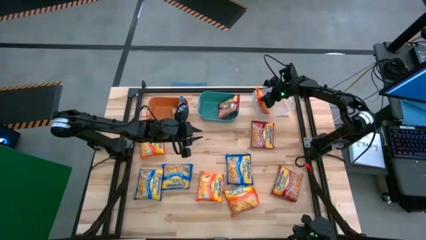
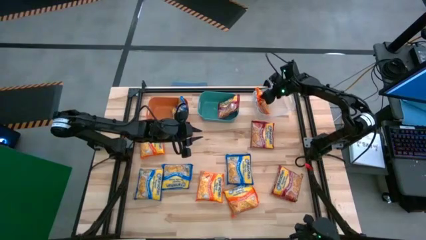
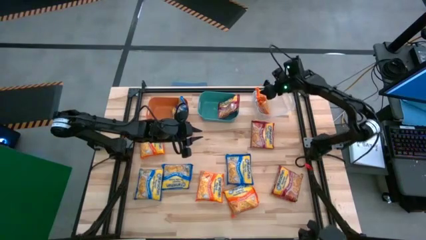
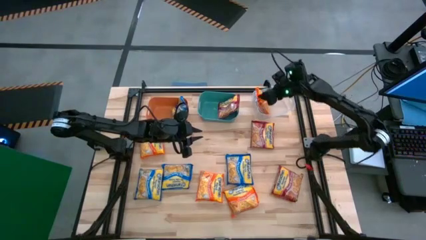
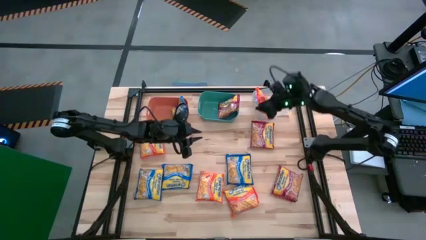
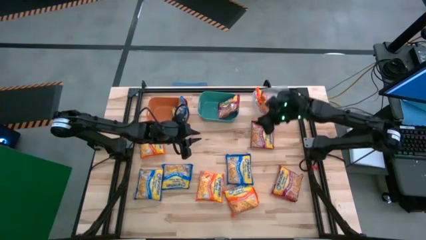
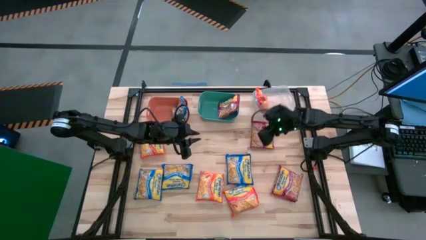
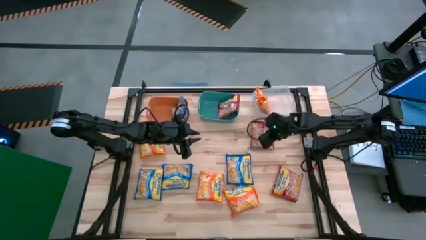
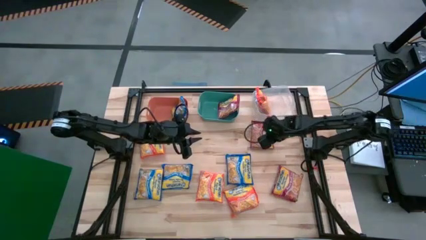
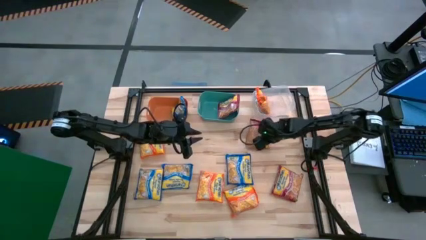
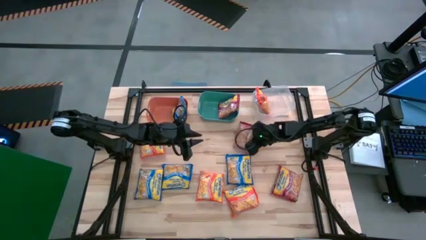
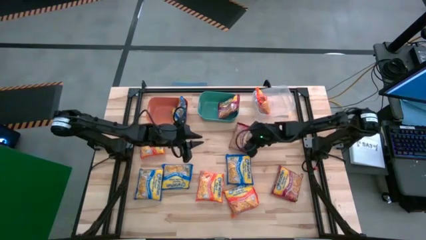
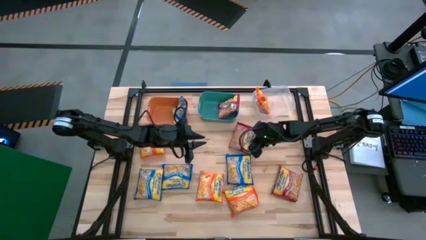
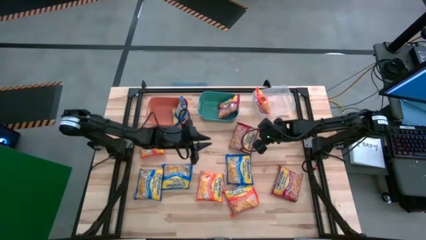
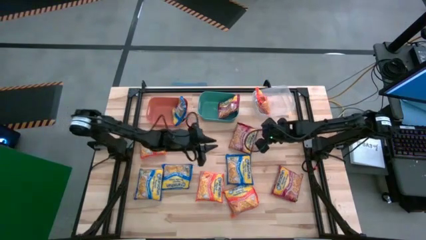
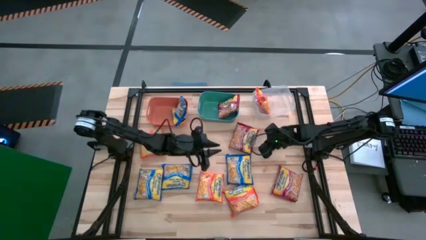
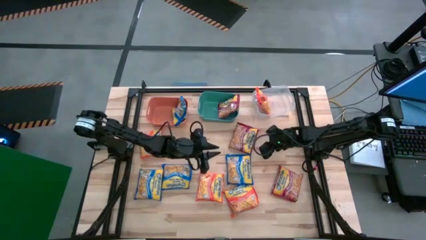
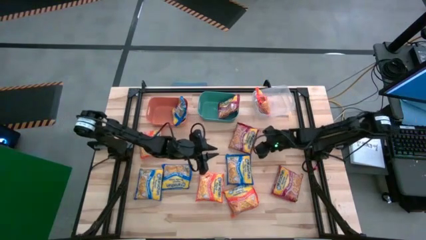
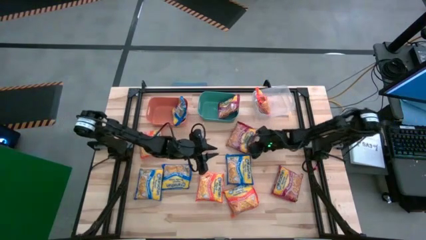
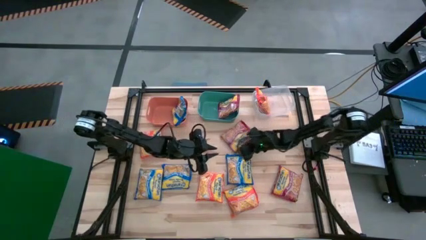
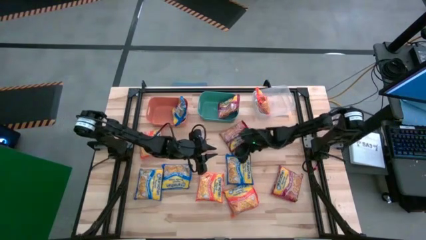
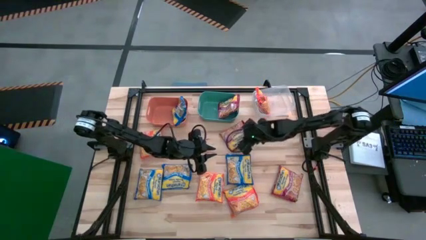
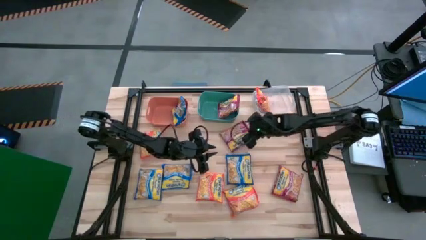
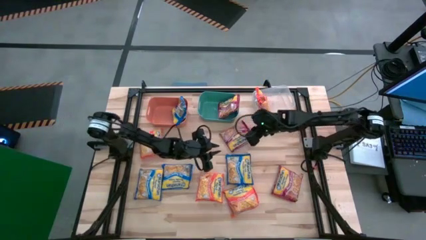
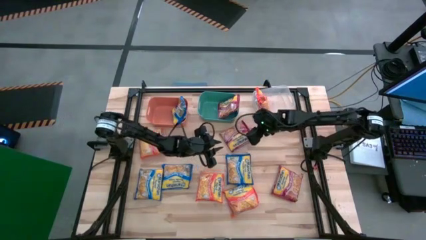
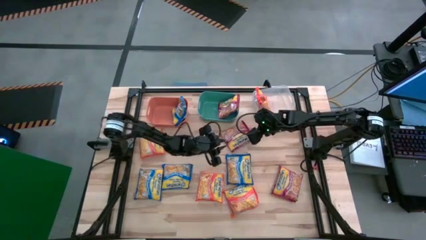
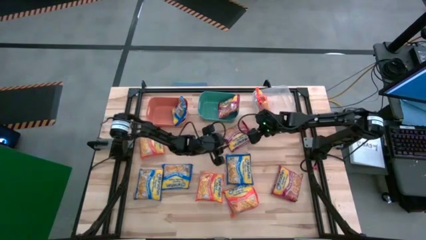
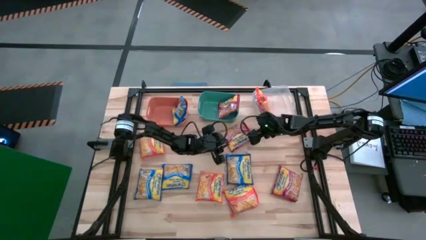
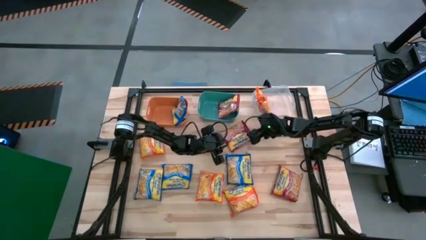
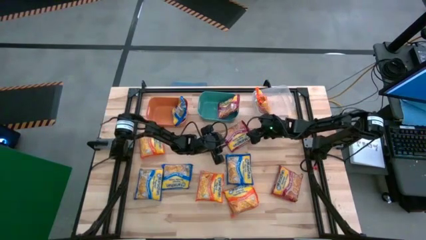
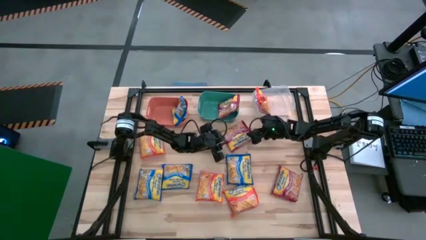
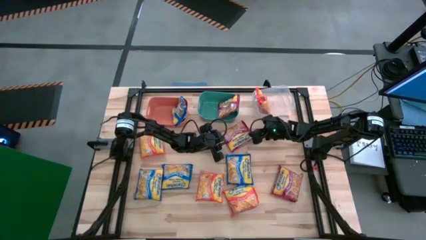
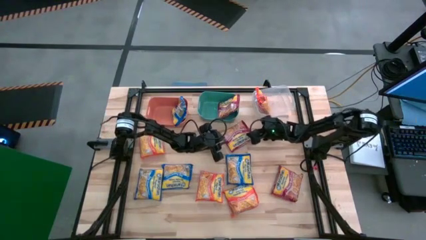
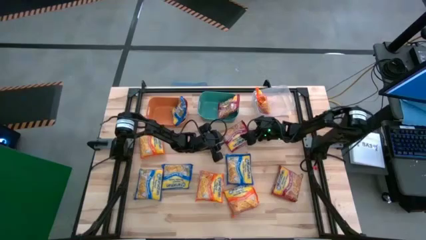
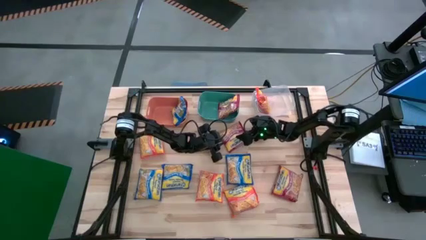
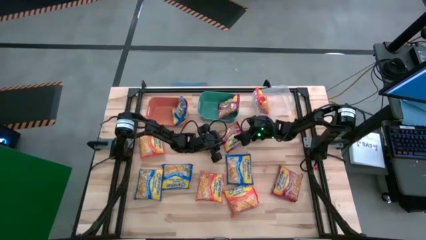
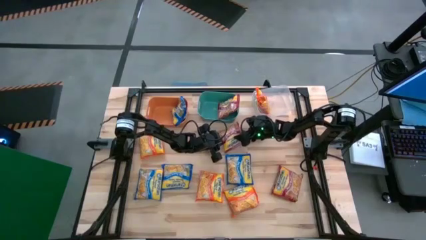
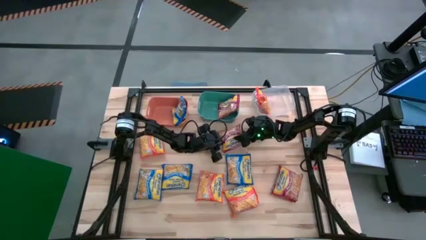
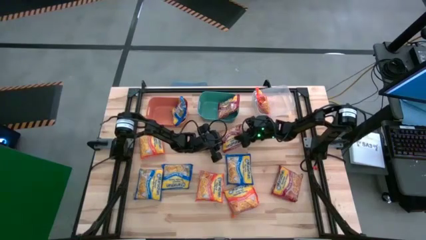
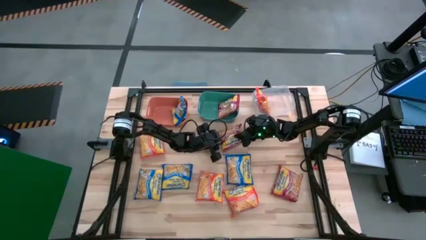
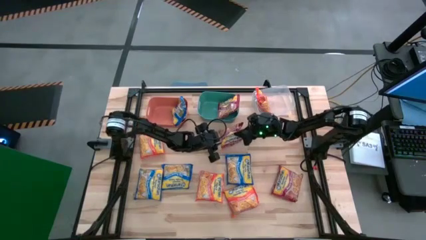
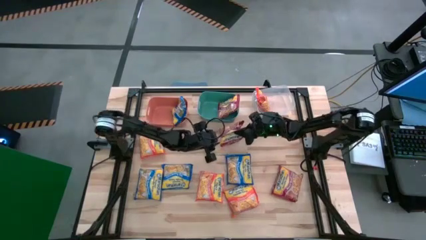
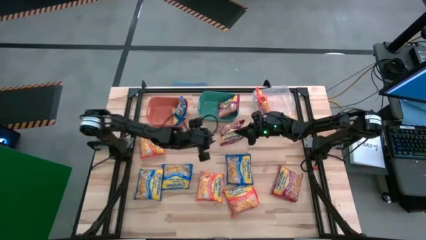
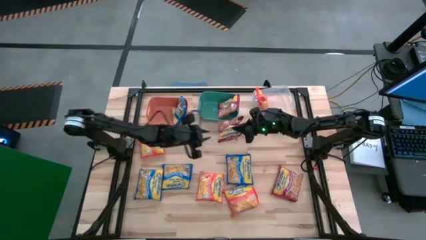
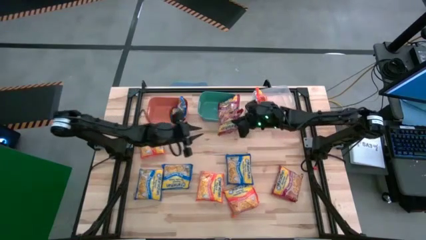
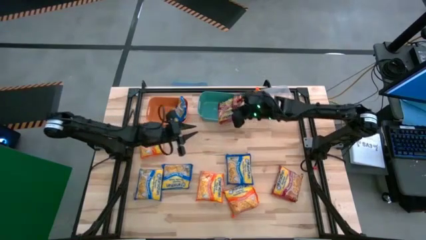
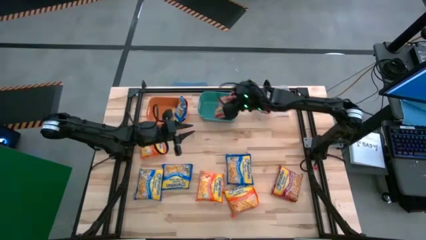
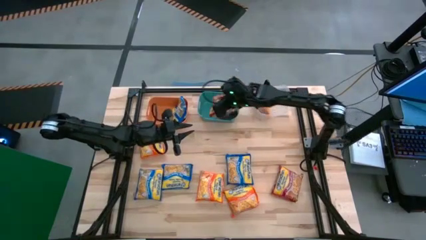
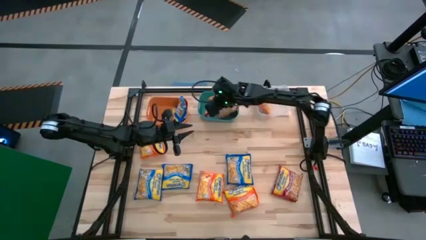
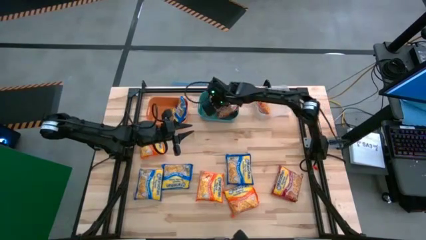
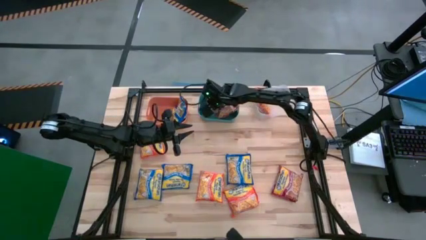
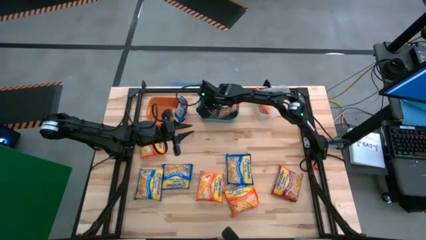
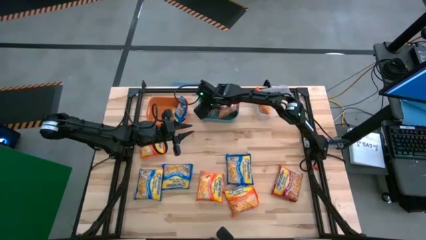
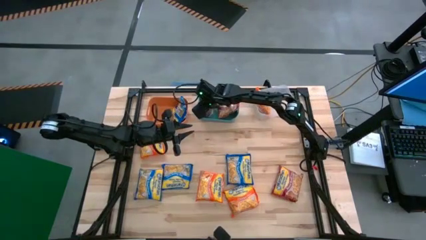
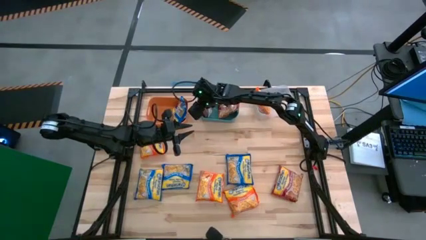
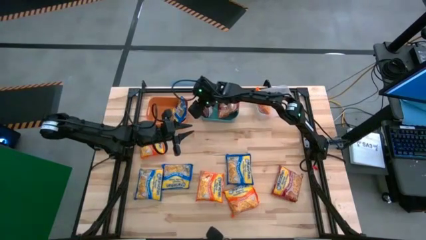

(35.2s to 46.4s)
Task: Sort Maruchan noodles
Put the red noodle pack into the green bin

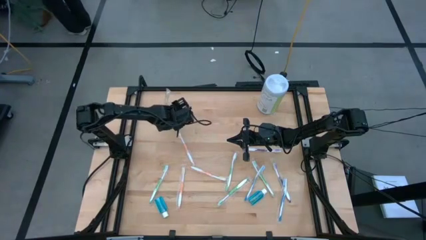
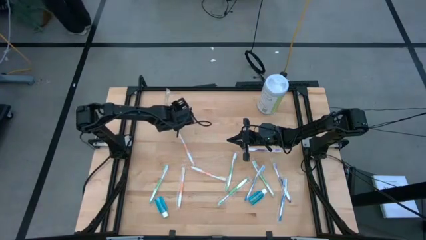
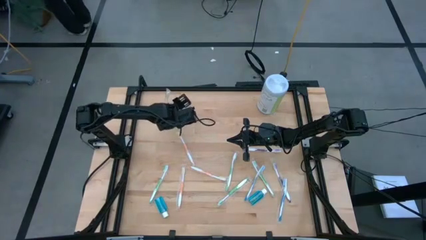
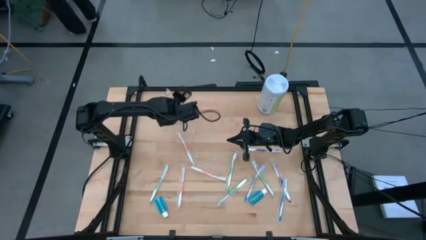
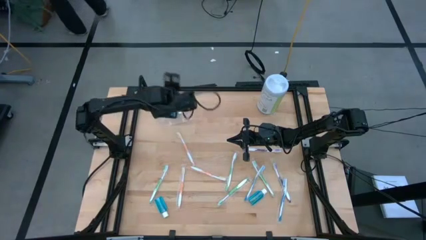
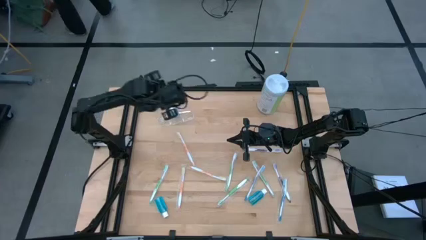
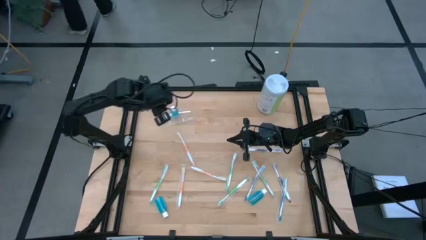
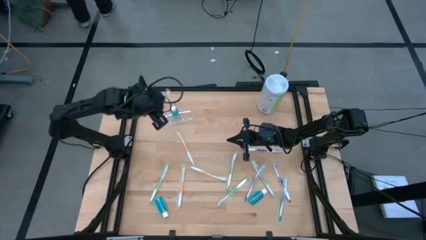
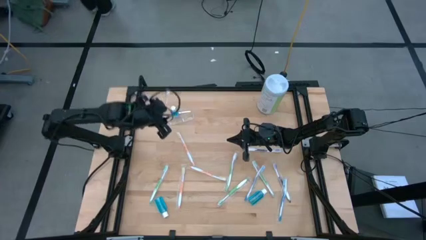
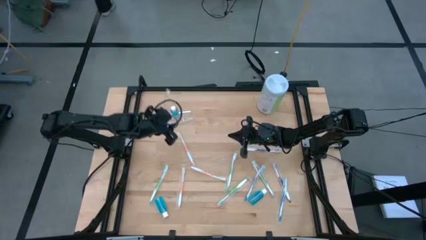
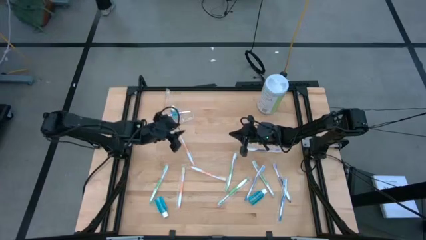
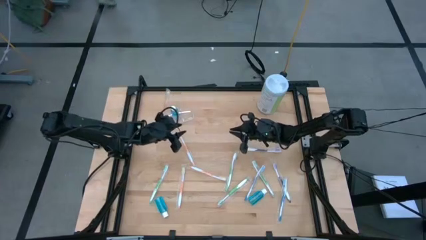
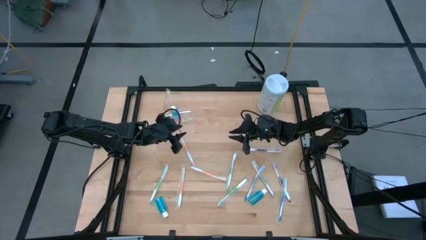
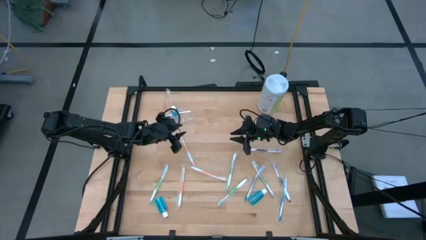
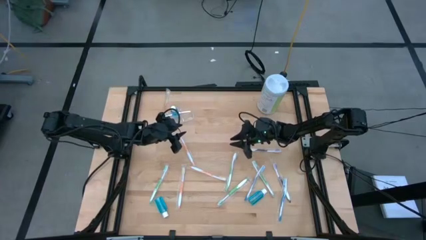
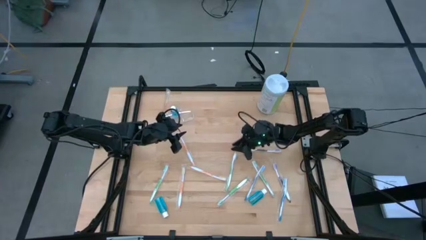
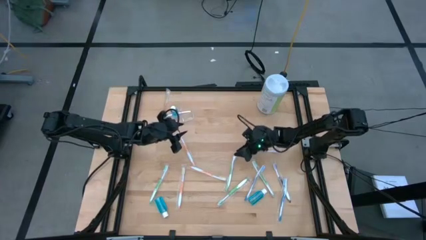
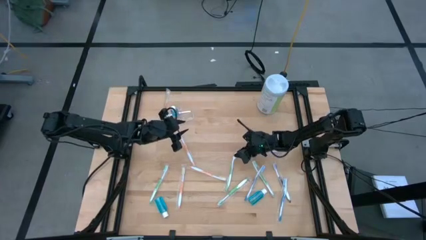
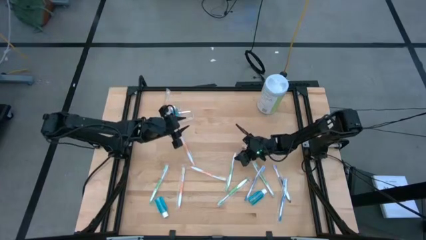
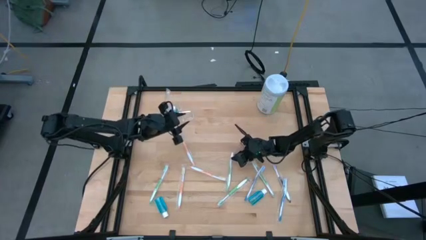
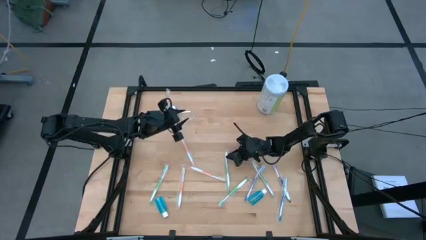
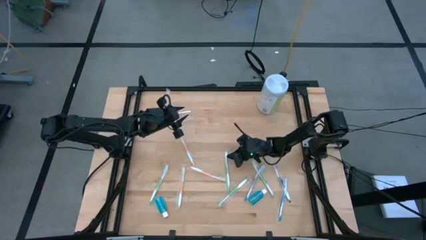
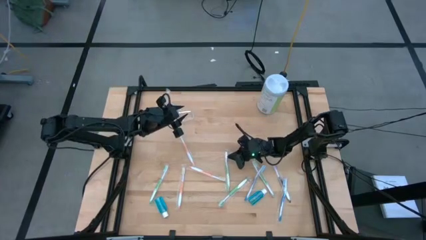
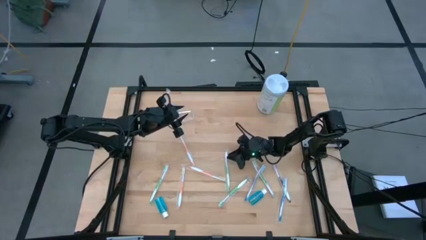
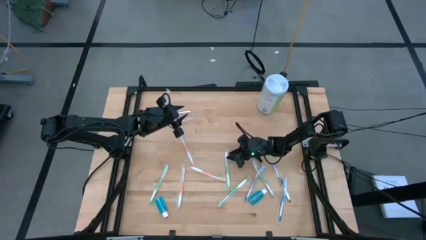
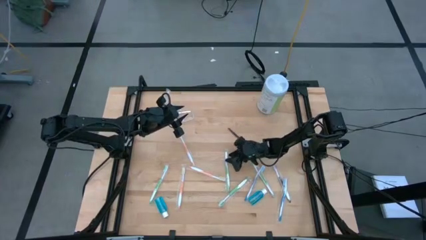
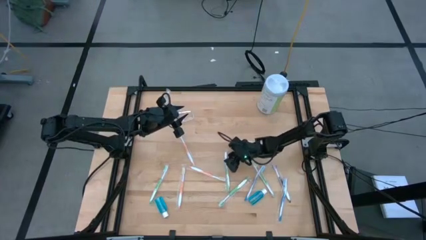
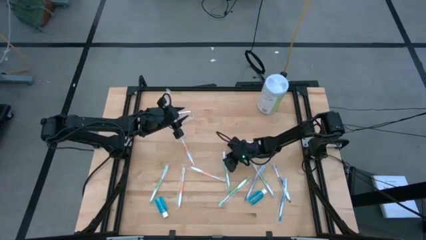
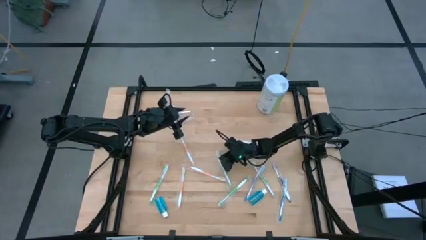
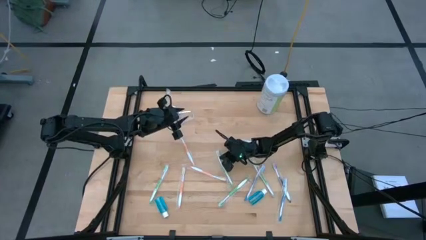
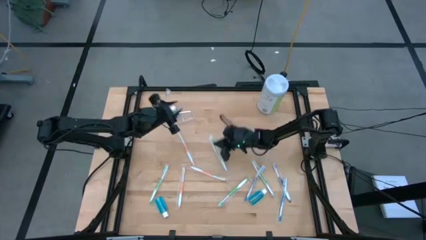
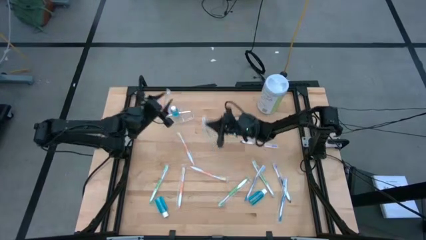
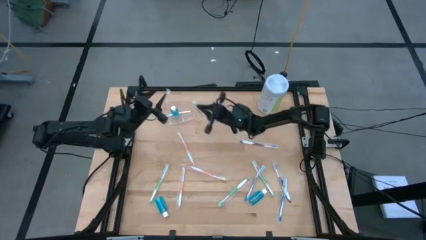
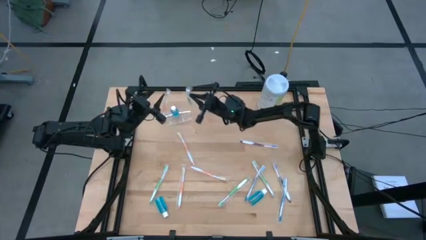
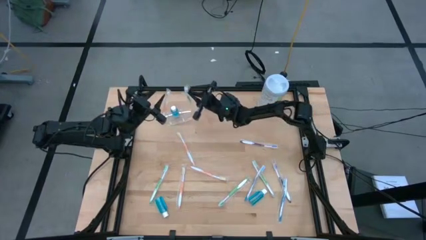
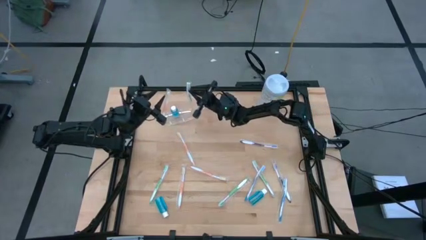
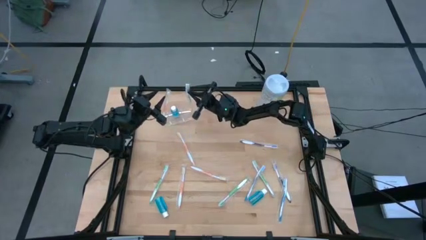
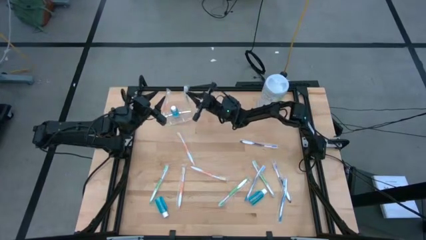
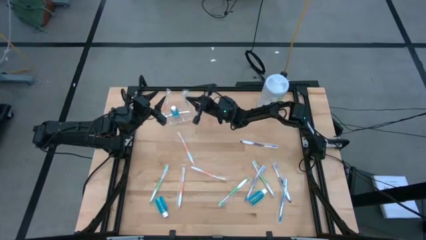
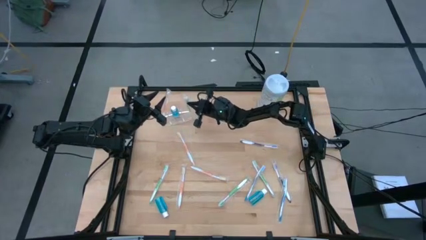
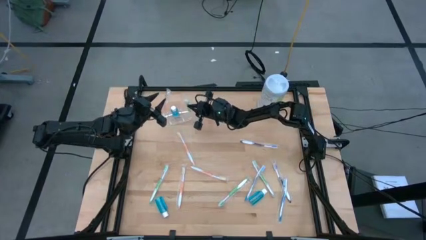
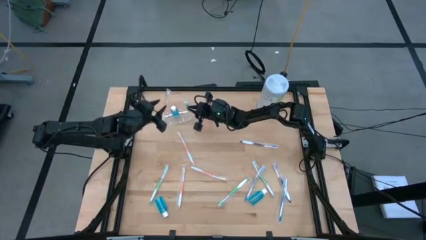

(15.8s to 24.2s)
Task: Pick & Place toothbrushing station
Put the green toothbrush into the transparent organizer
